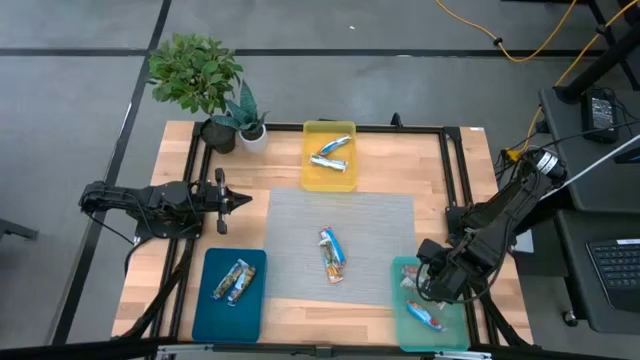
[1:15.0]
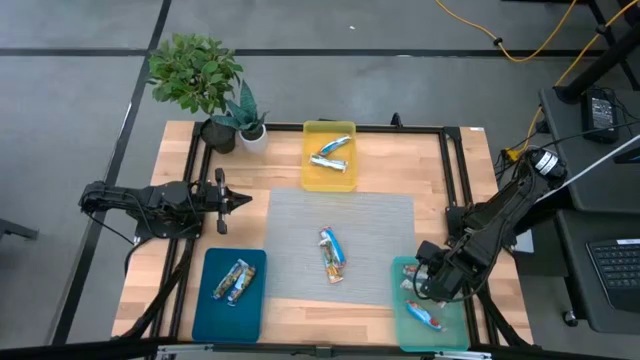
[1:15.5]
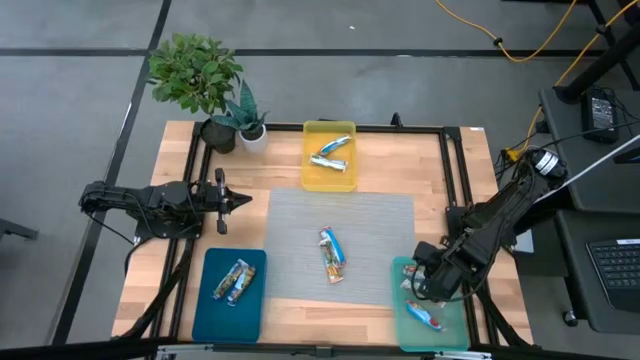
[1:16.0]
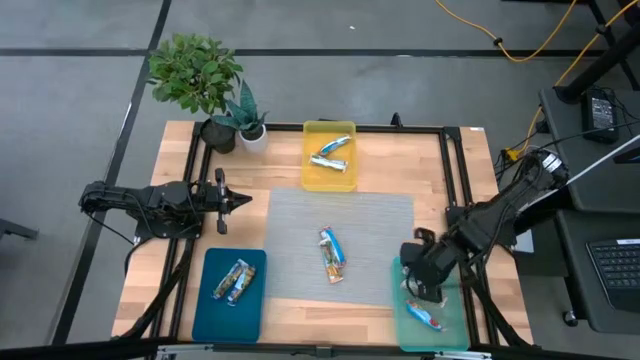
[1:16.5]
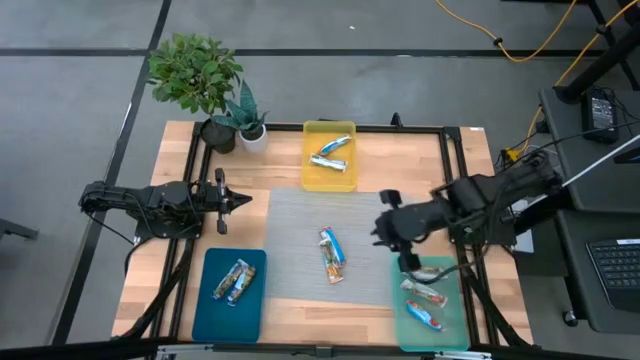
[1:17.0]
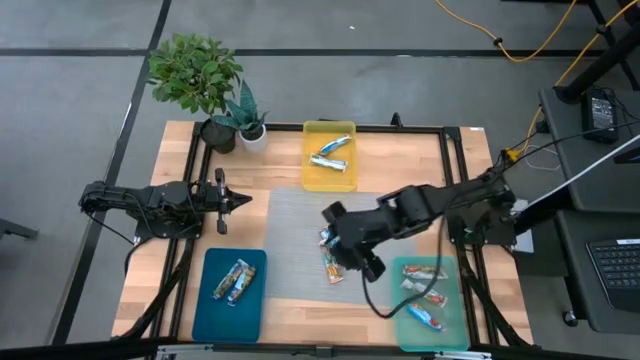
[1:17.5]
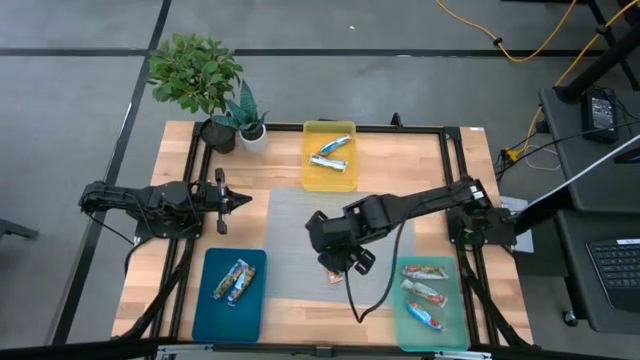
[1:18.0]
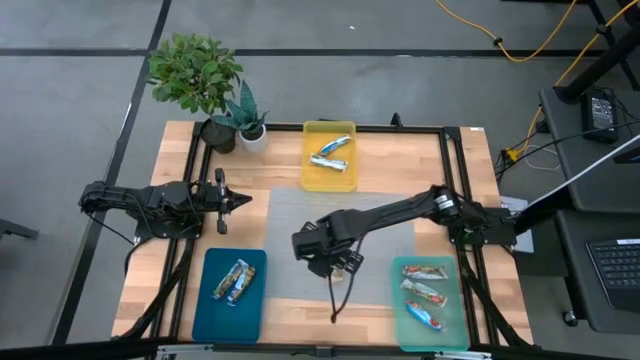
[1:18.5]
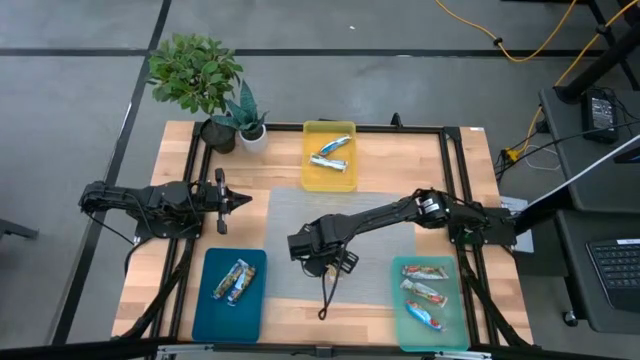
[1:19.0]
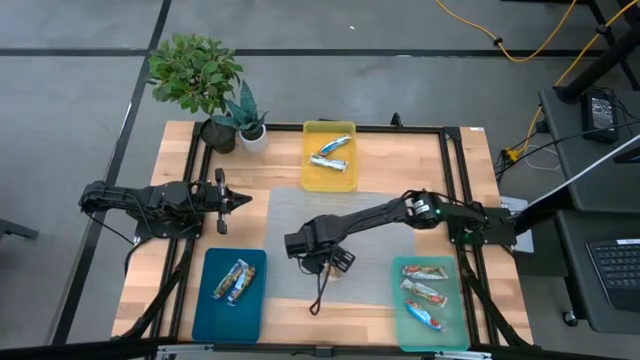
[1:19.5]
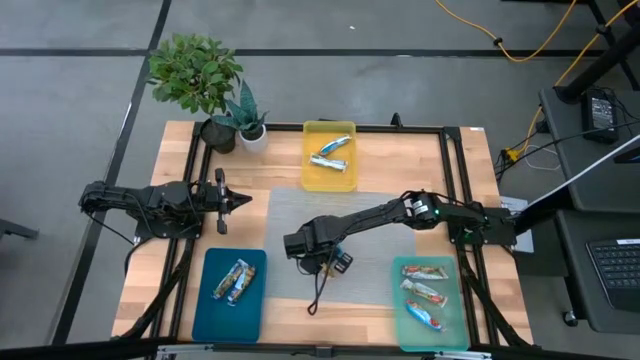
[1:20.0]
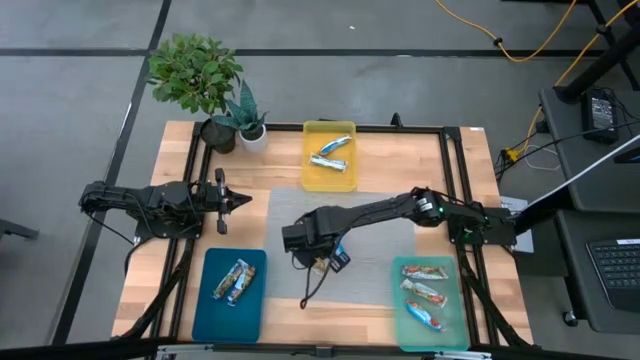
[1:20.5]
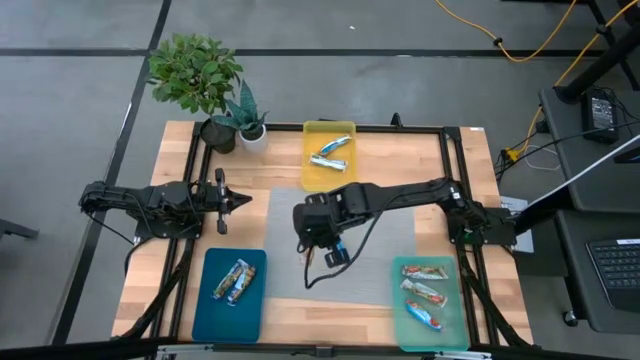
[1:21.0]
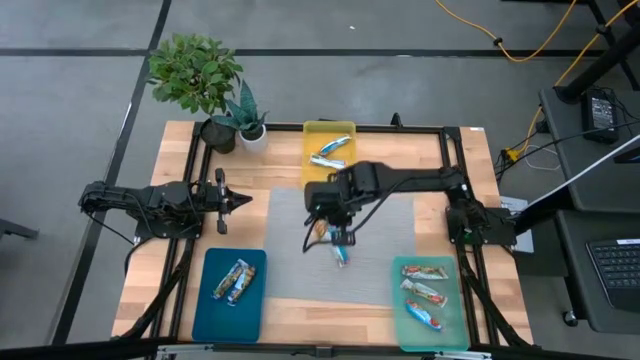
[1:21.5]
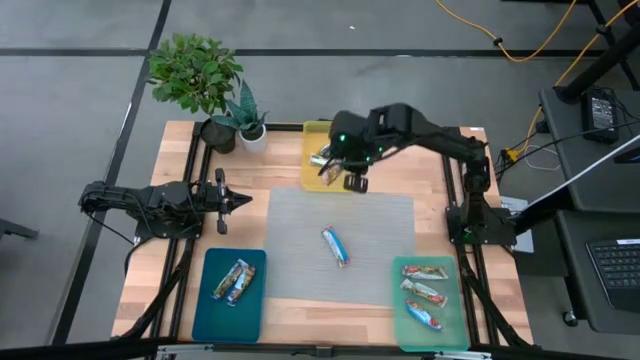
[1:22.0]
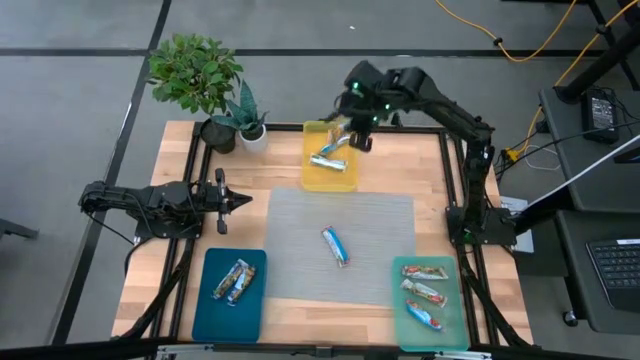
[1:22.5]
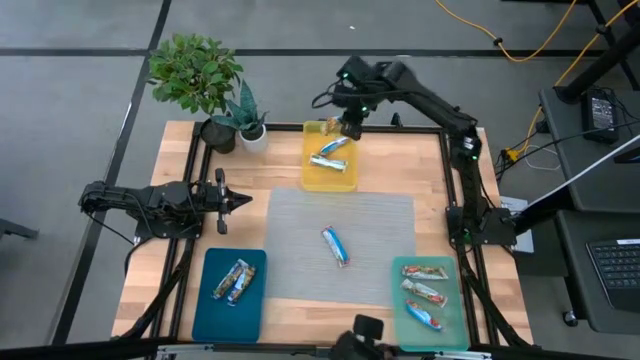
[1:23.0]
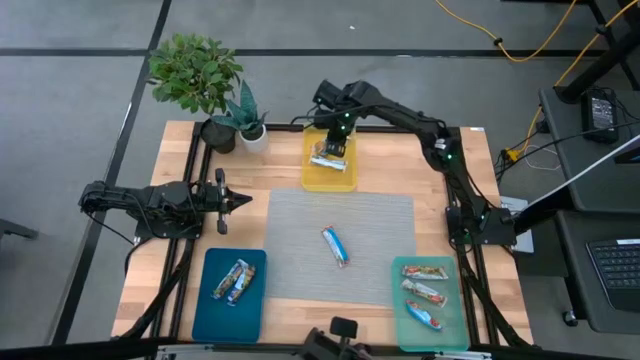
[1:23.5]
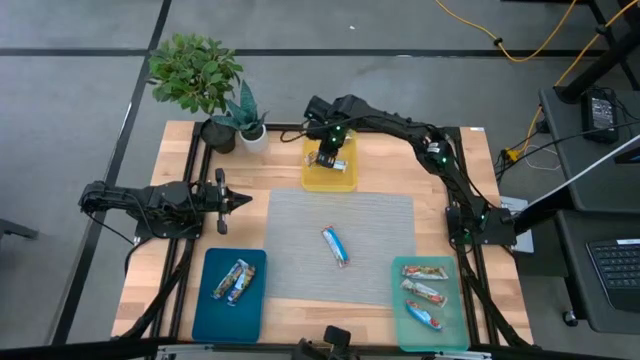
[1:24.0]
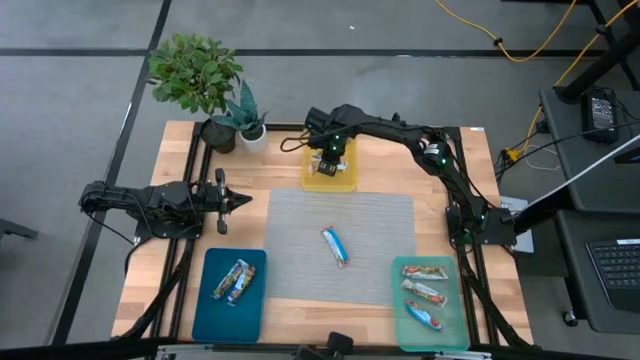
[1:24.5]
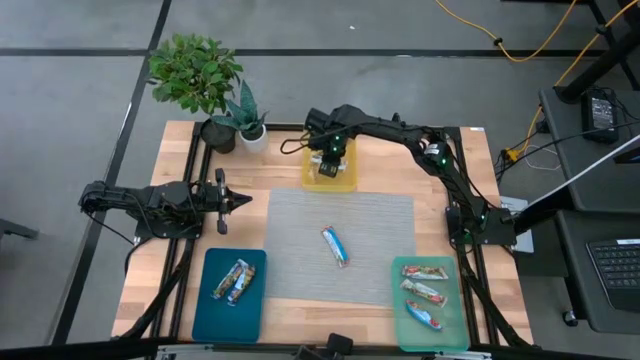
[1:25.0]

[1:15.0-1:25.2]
Task: Pick and place Granola Bars by type
Put the yellow granola bar into the yellow bin

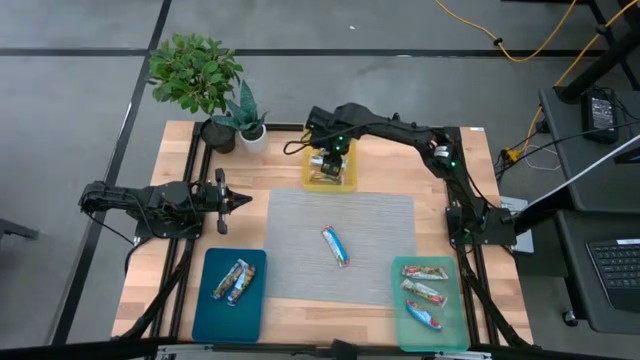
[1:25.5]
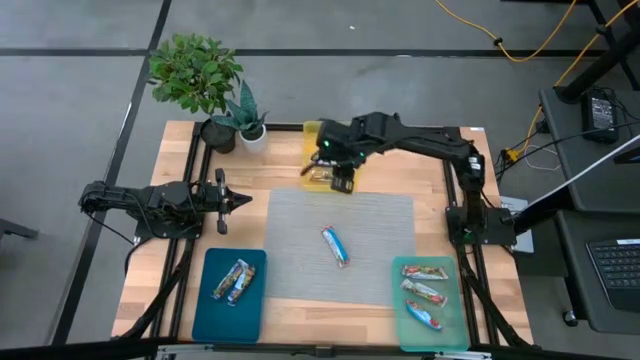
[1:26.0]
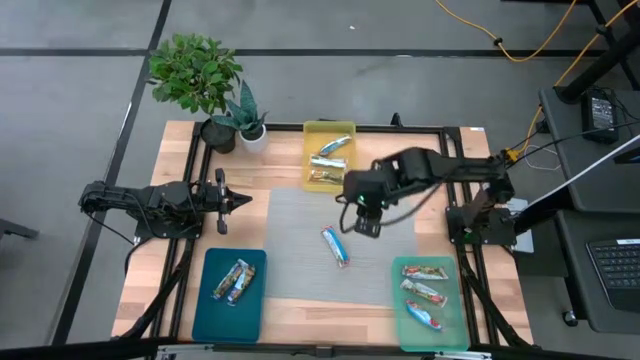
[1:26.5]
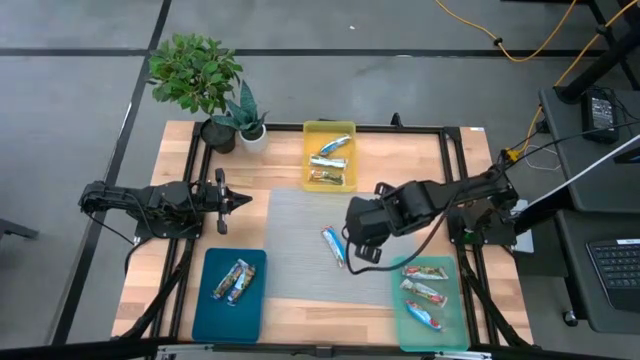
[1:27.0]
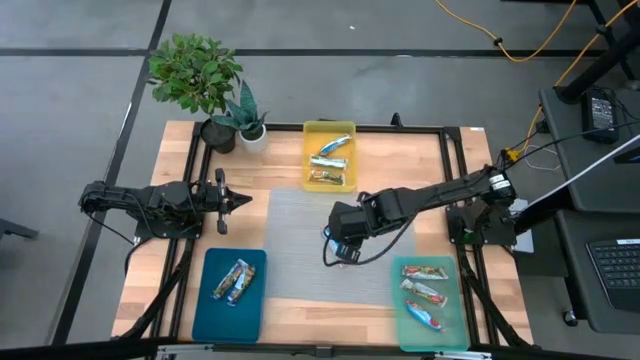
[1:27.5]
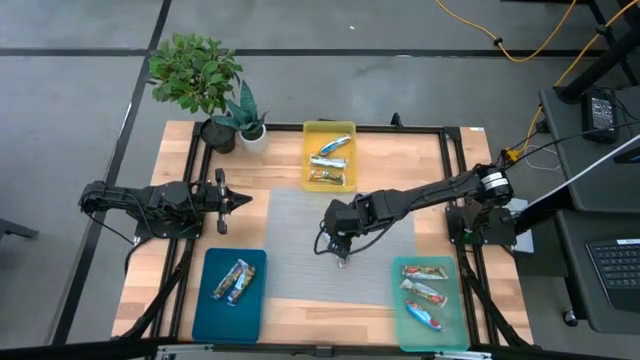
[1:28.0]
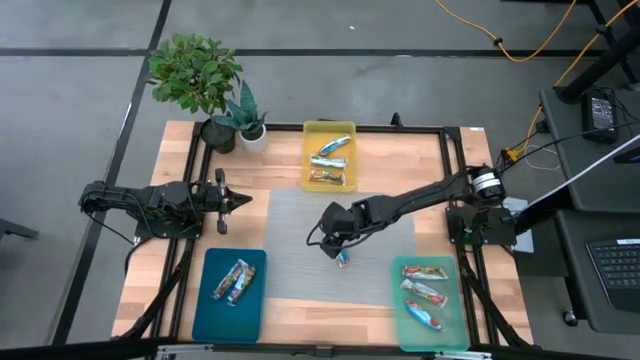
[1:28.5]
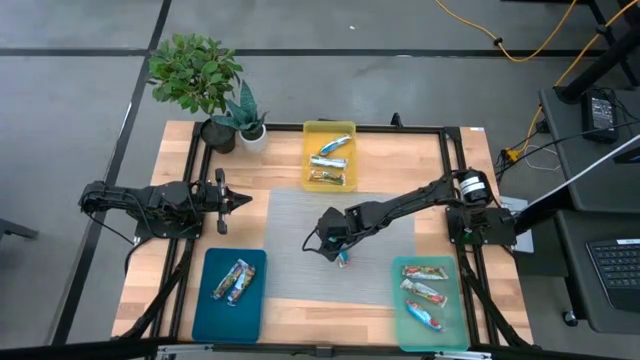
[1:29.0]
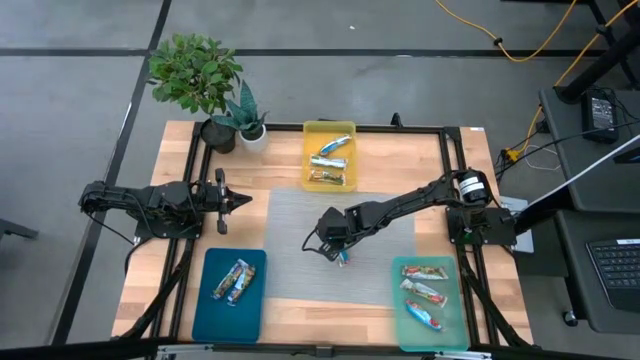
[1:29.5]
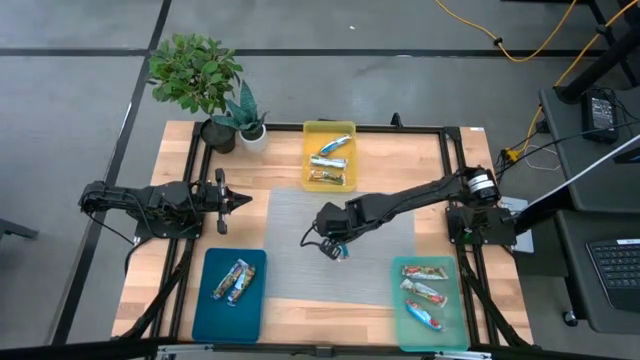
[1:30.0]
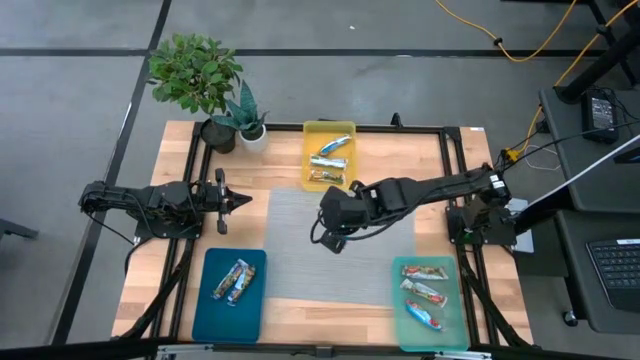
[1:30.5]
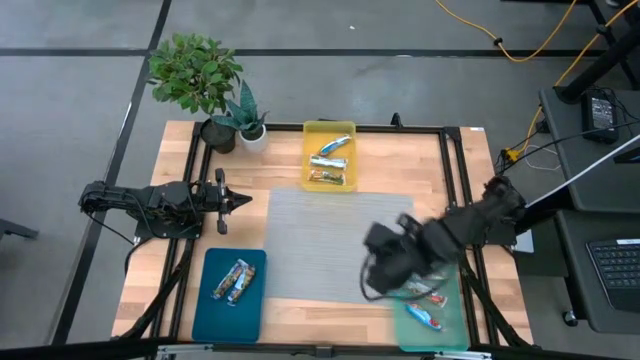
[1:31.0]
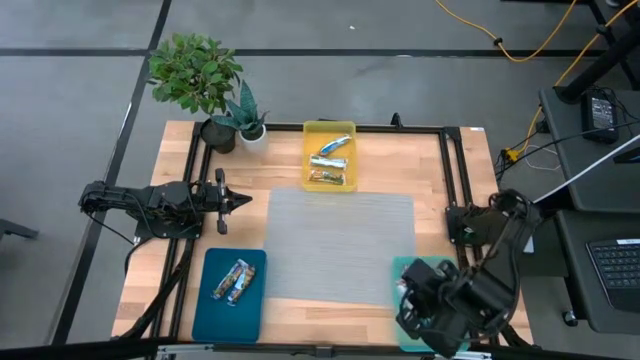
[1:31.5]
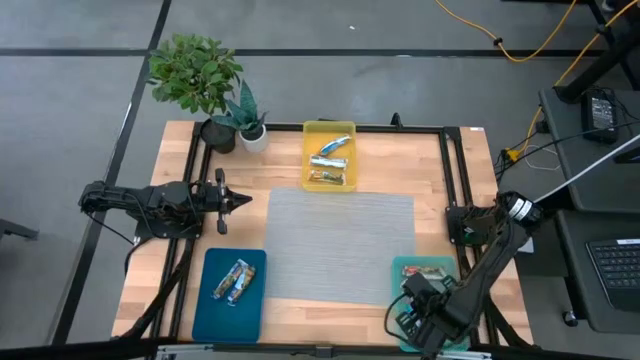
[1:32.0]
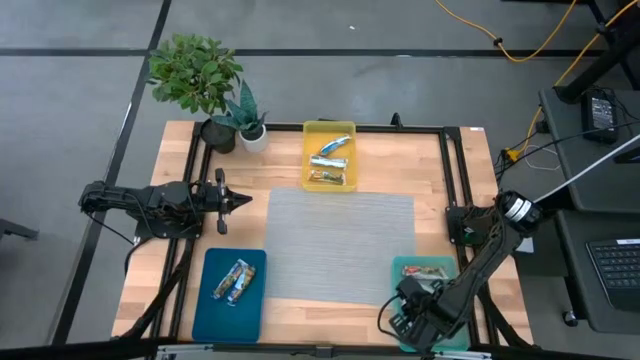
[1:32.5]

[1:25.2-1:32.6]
Put the red granola bar into the light blue bin

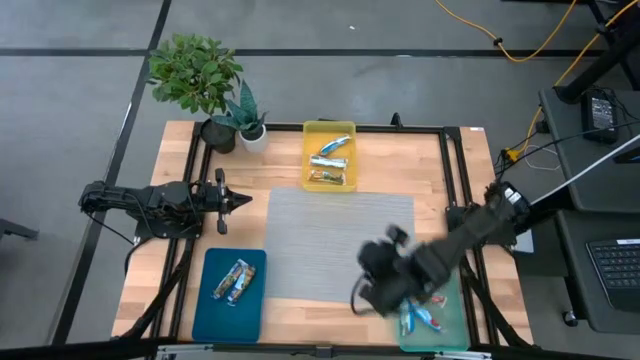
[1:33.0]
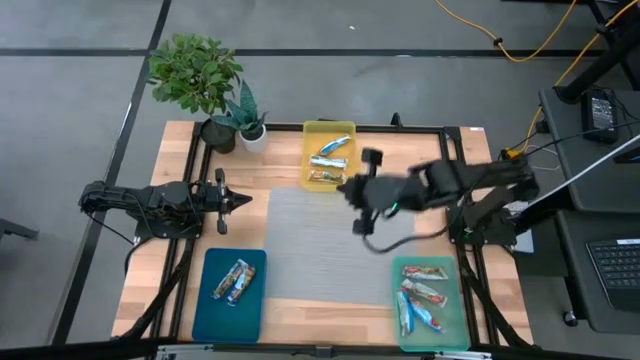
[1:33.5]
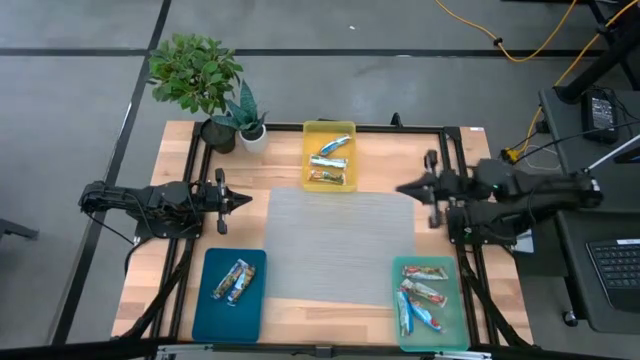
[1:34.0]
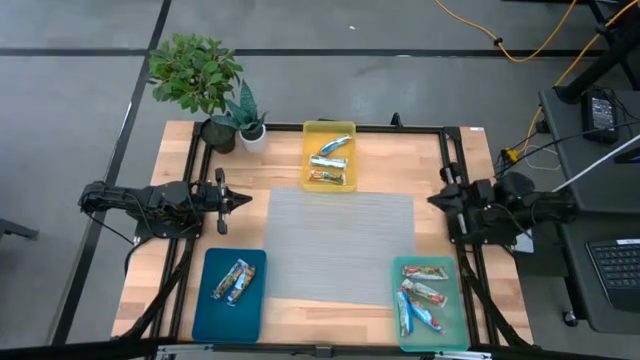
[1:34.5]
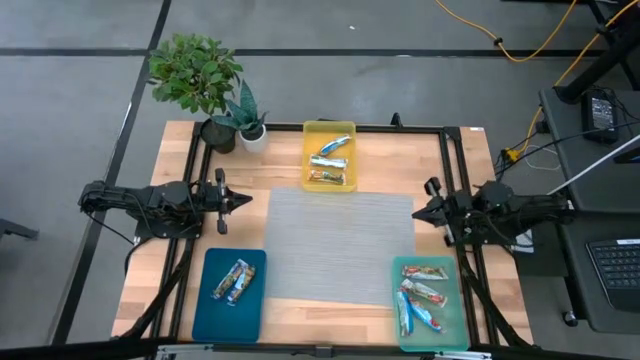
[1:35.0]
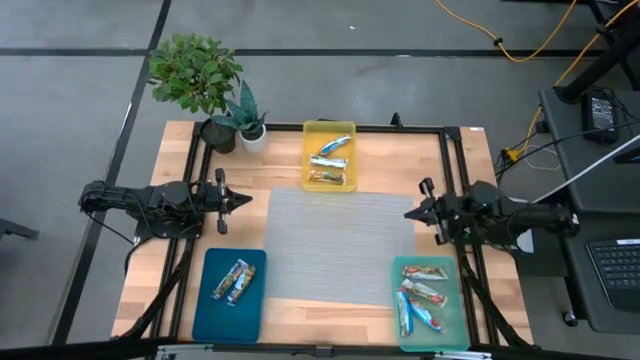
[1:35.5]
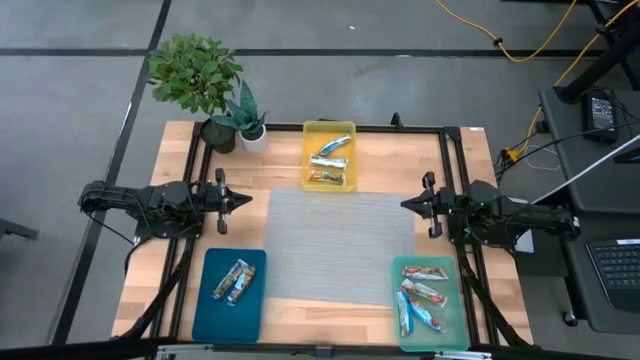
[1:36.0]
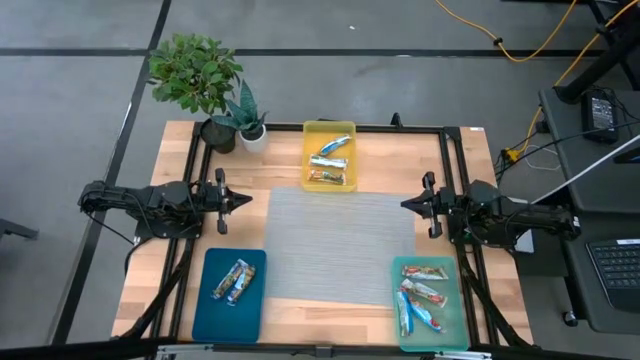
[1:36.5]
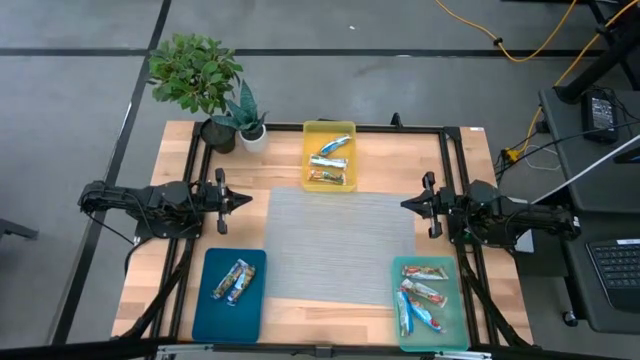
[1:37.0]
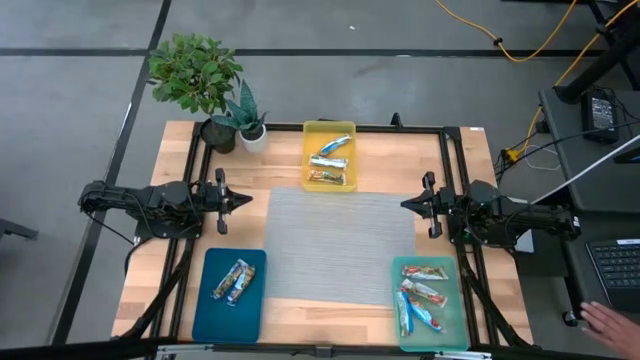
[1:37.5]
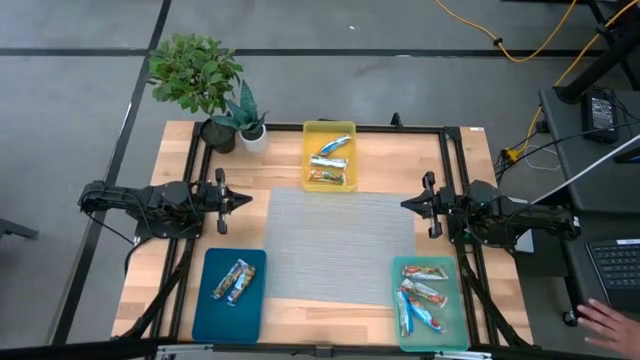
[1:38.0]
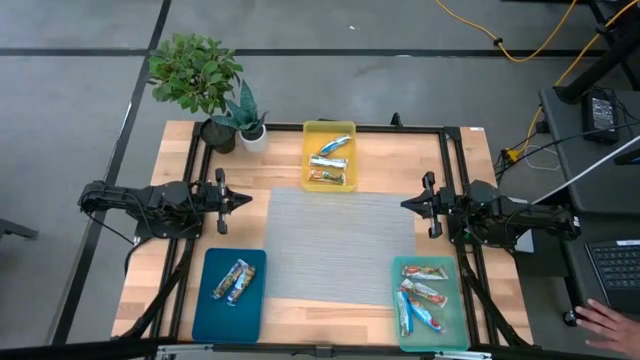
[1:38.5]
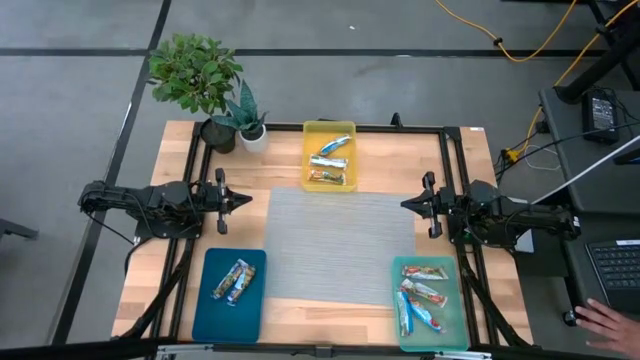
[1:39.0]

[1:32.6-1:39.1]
Return to Home Position
